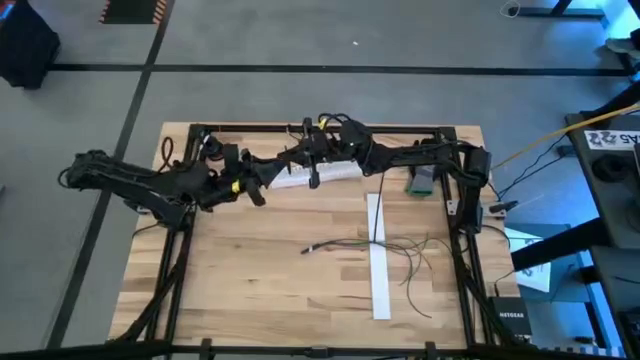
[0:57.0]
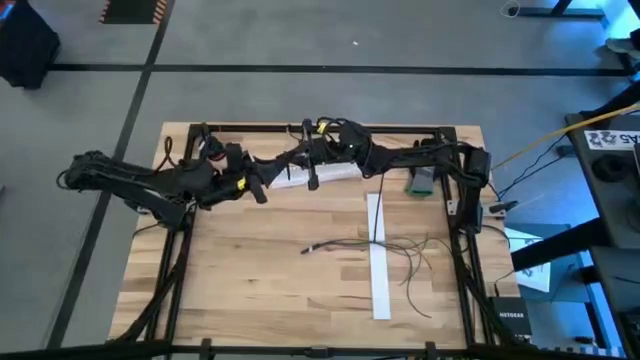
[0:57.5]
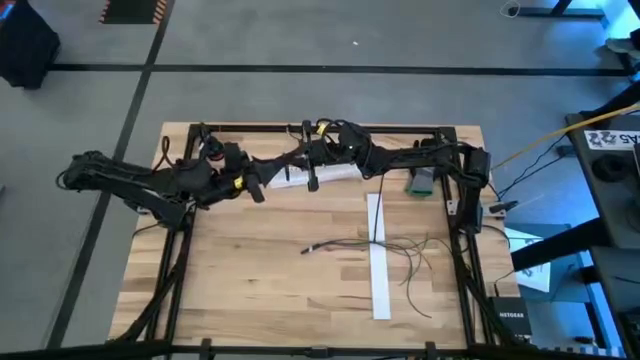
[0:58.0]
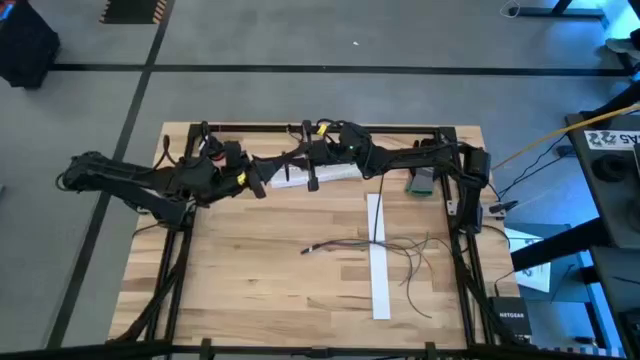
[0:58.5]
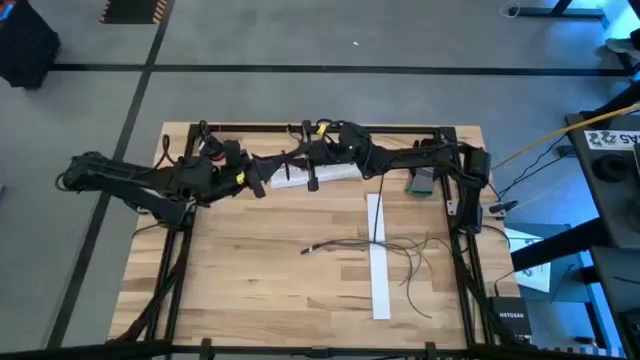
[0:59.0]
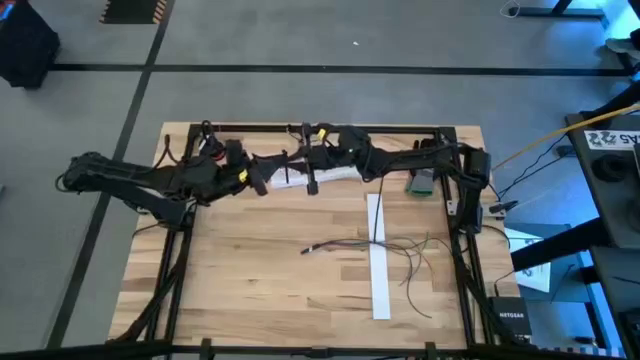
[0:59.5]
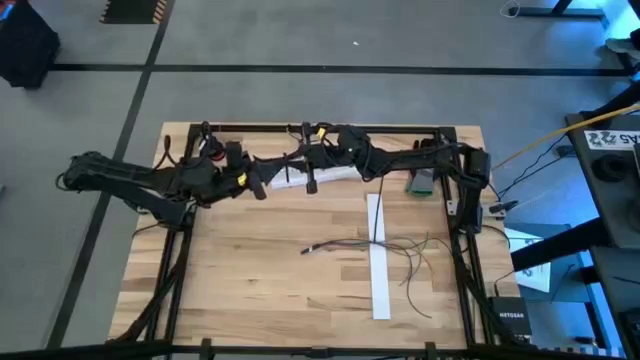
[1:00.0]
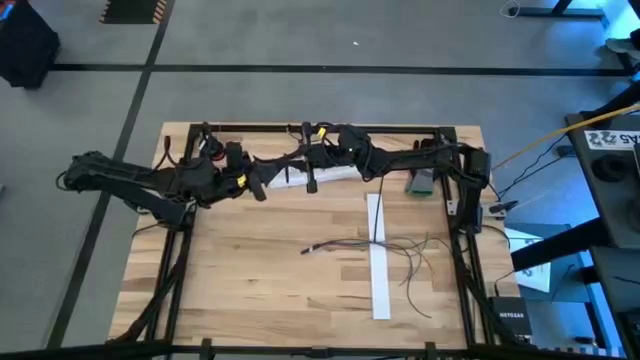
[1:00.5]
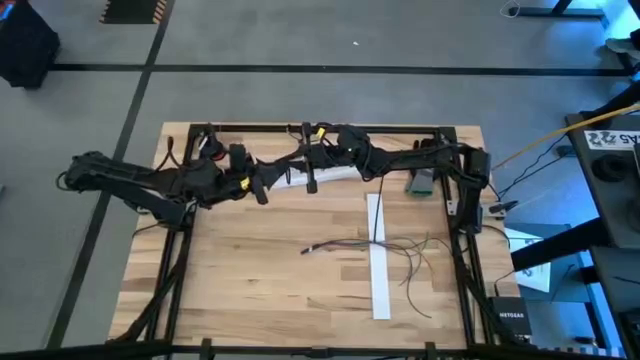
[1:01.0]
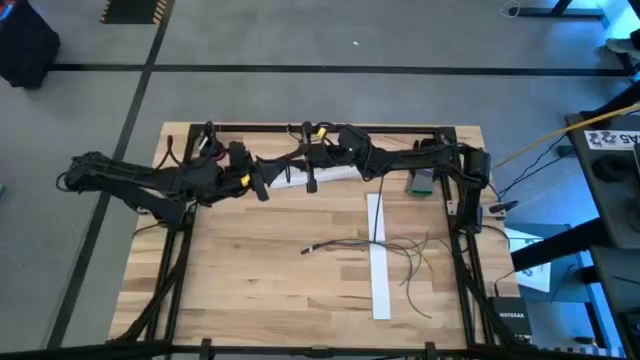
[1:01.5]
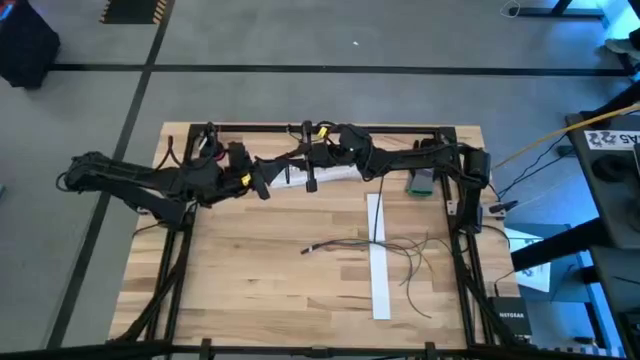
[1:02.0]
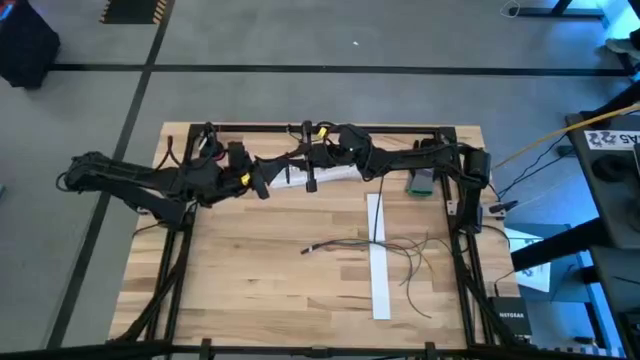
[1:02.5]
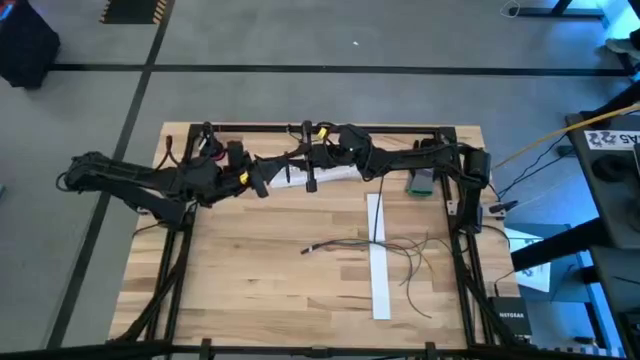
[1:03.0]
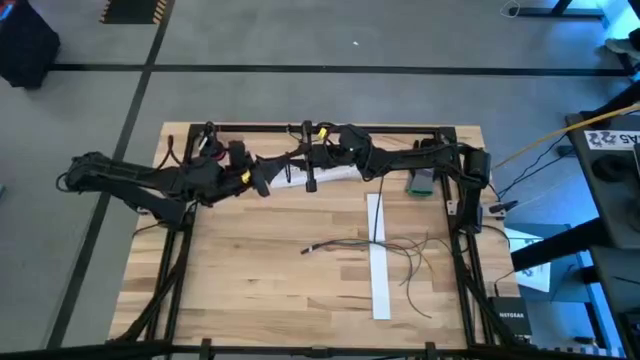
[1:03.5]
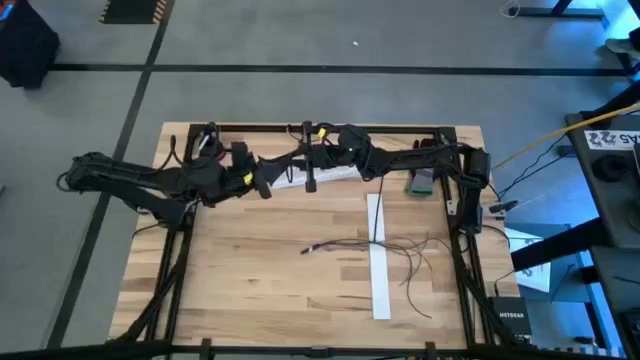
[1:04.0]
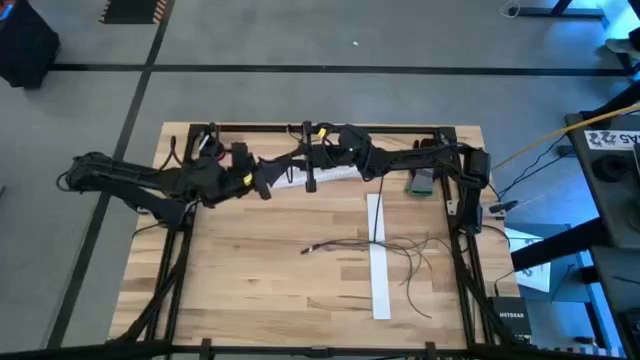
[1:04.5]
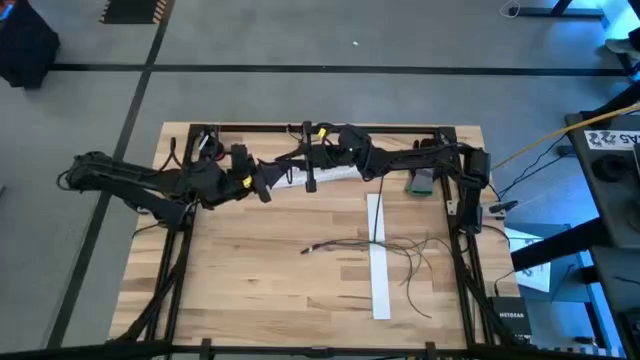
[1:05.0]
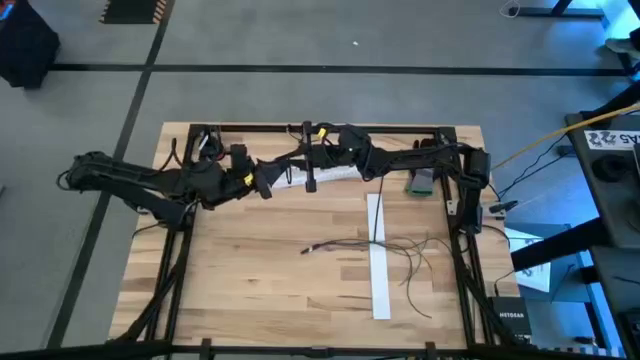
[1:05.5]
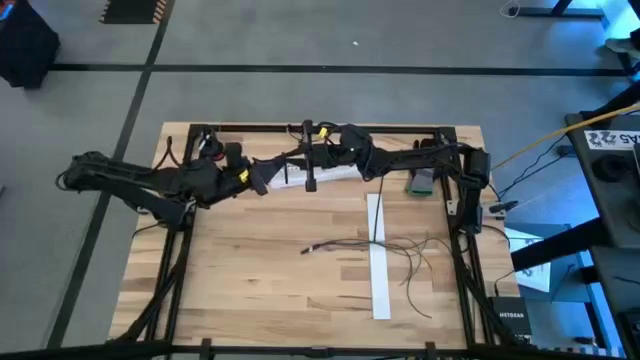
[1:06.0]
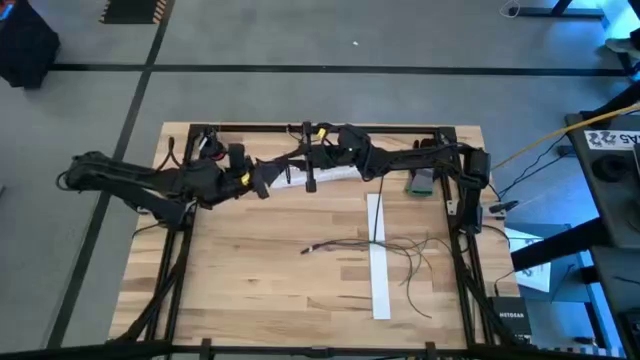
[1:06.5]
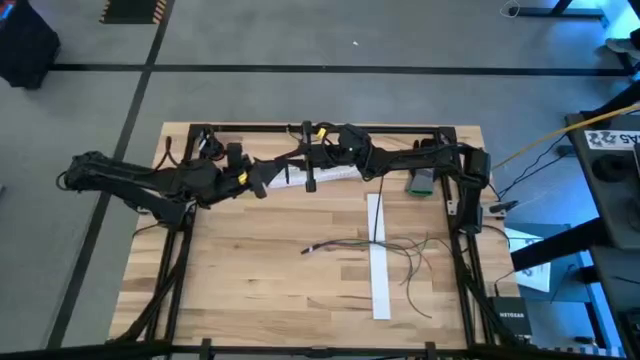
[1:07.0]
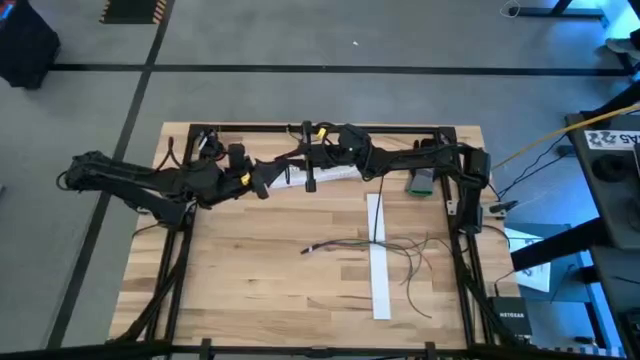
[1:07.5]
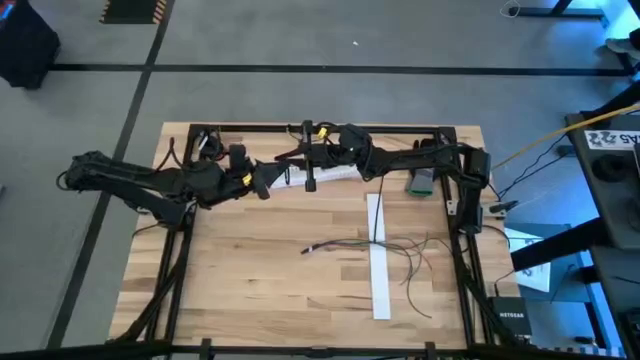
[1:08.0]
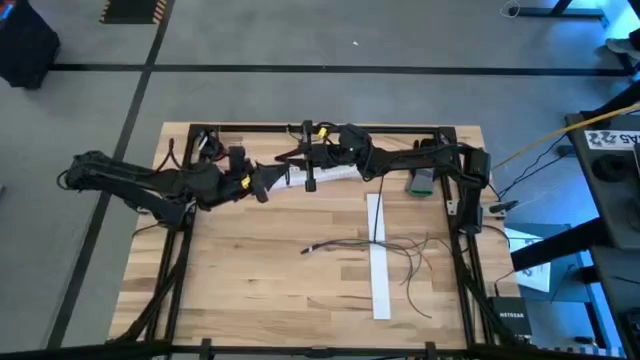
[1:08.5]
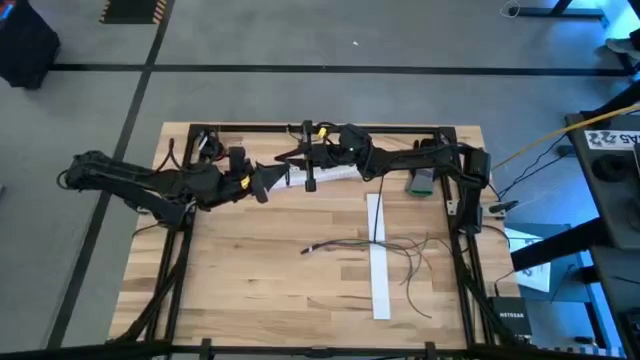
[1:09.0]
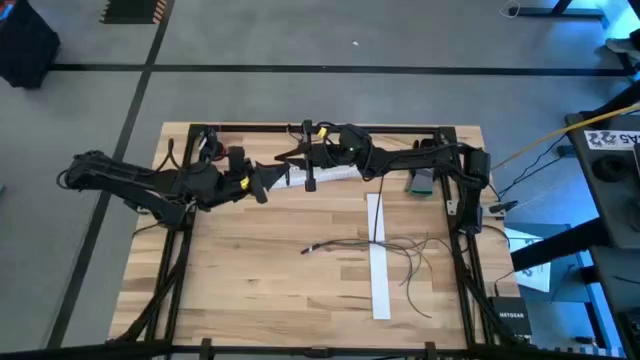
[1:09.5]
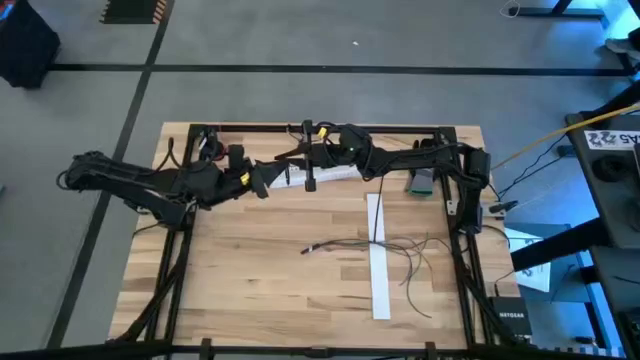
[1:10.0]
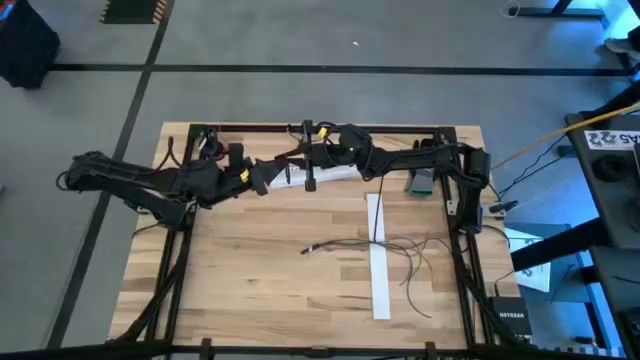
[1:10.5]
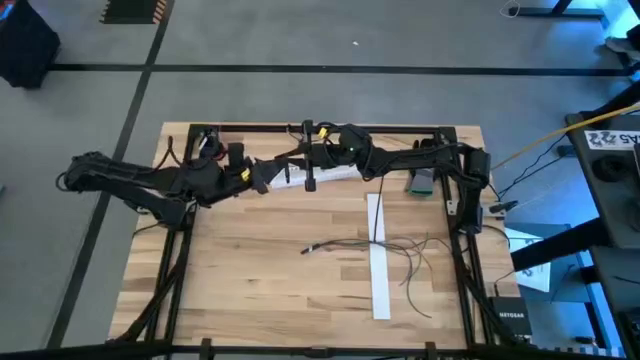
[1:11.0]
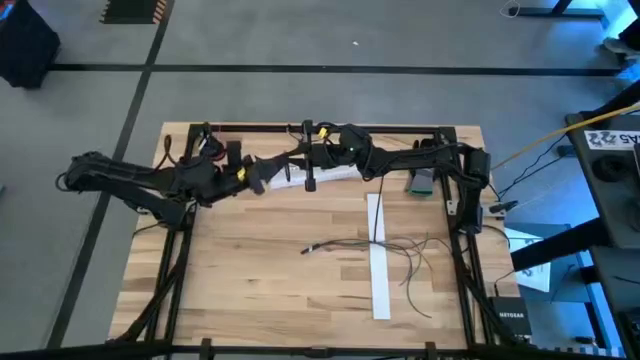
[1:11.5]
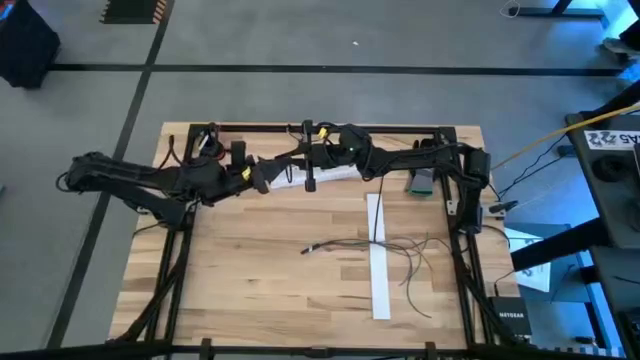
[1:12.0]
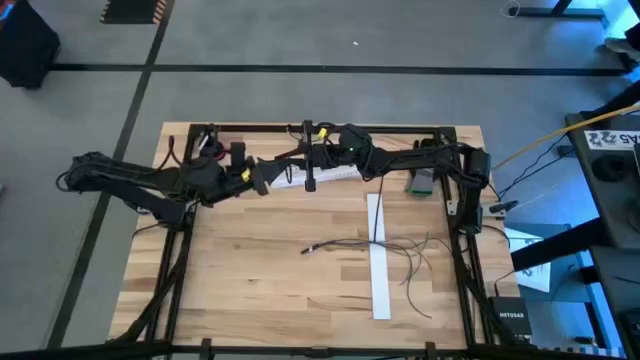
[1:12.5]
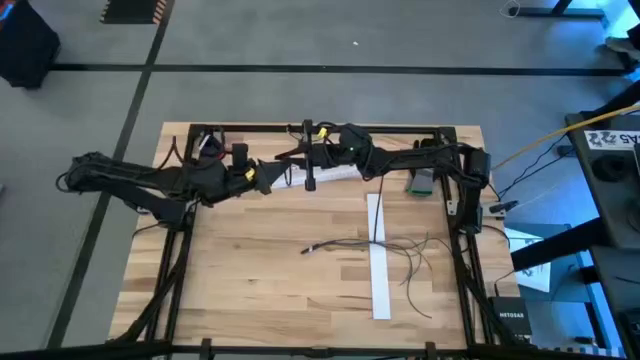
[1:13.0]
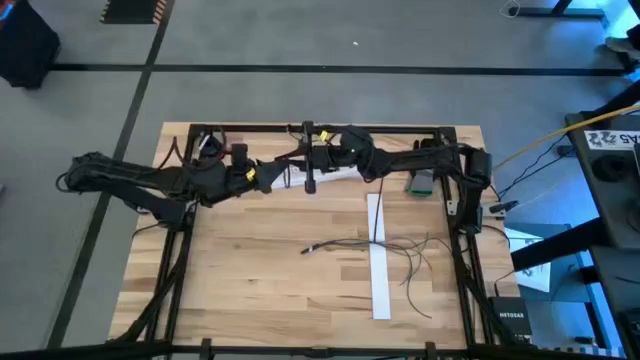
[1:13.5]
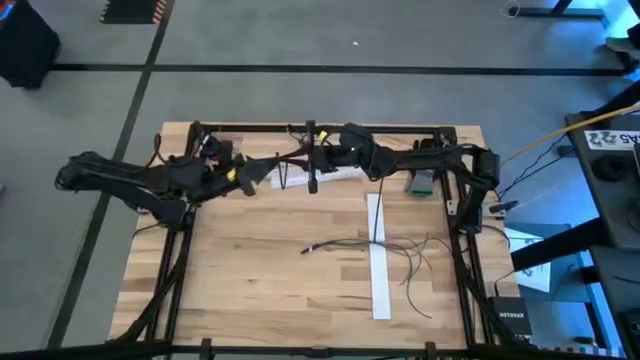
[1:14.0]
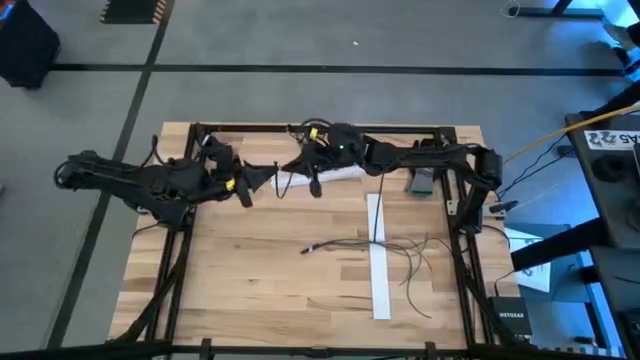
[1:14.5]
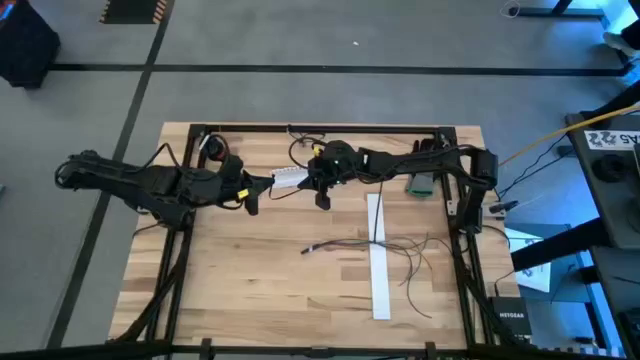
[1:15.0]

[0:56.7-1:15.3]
Task: Ziptie cables
Wrap the black zip-tie around the cable wires
